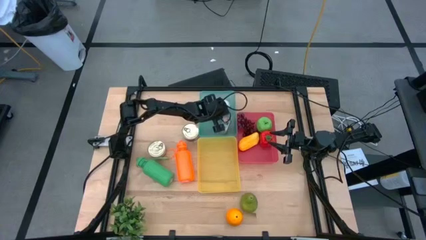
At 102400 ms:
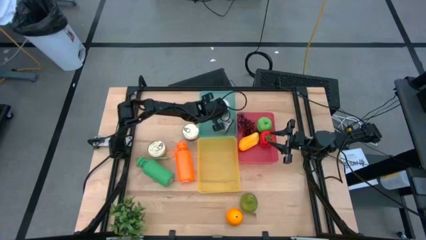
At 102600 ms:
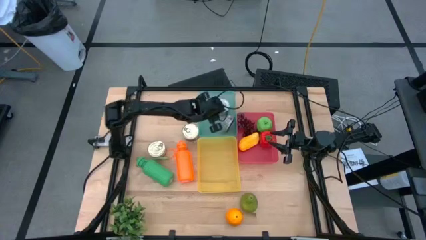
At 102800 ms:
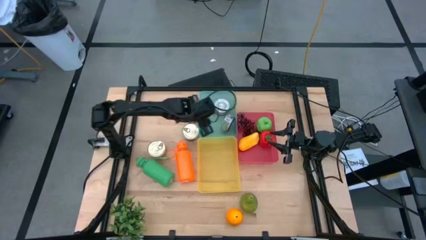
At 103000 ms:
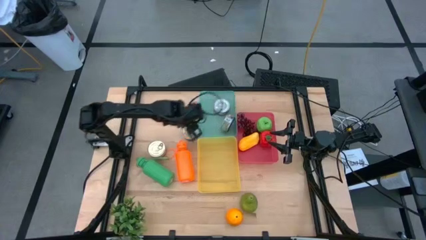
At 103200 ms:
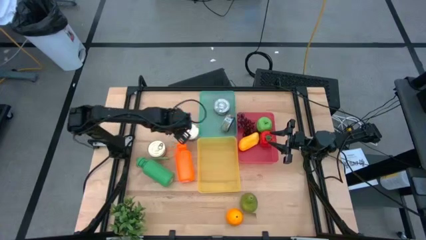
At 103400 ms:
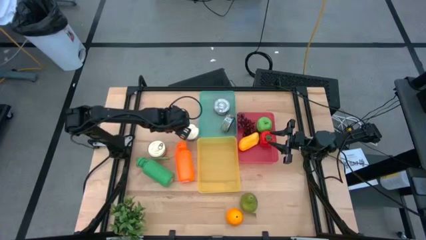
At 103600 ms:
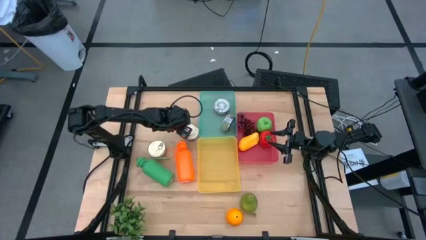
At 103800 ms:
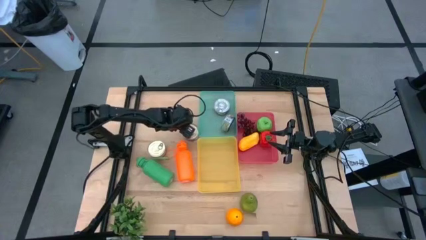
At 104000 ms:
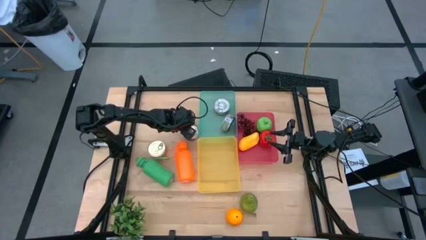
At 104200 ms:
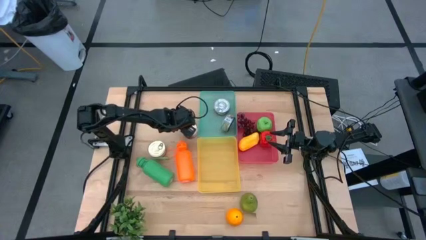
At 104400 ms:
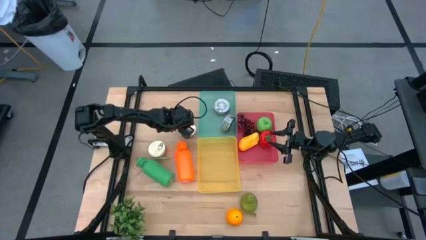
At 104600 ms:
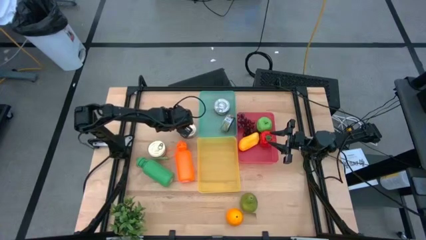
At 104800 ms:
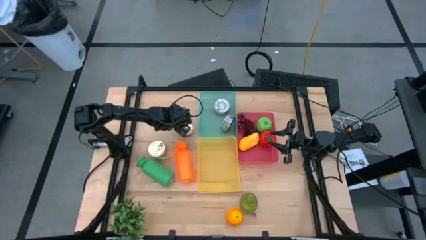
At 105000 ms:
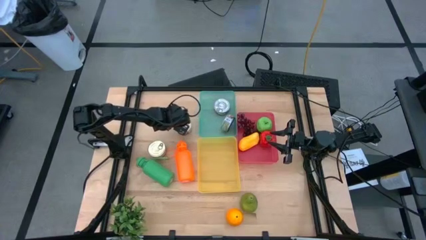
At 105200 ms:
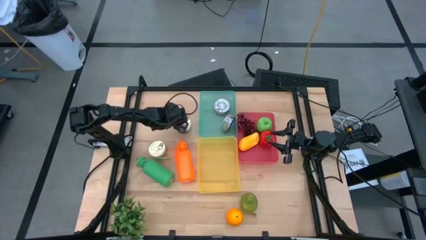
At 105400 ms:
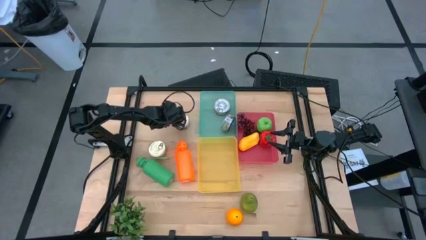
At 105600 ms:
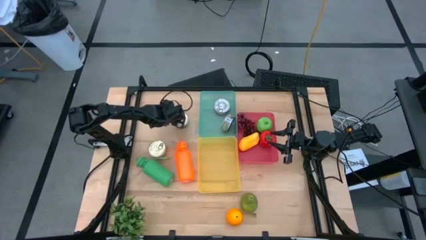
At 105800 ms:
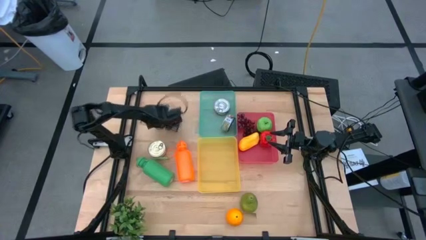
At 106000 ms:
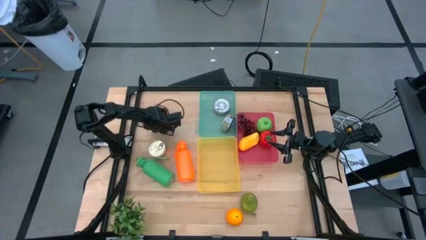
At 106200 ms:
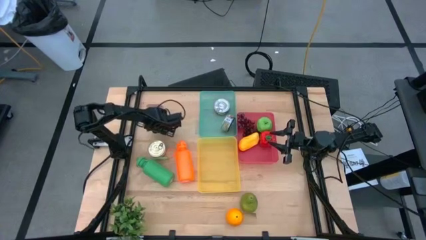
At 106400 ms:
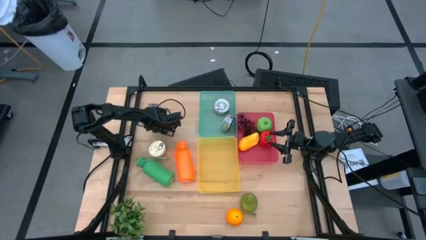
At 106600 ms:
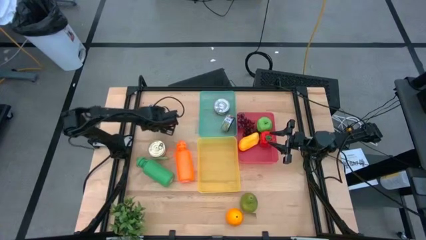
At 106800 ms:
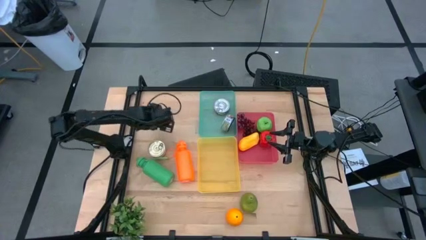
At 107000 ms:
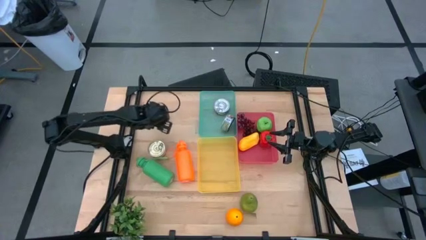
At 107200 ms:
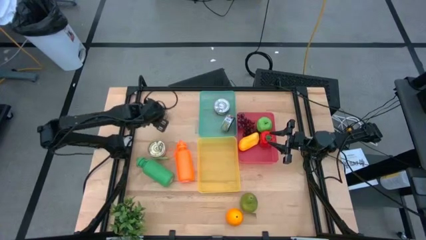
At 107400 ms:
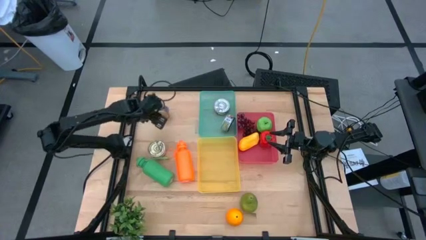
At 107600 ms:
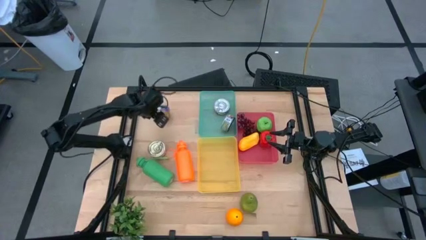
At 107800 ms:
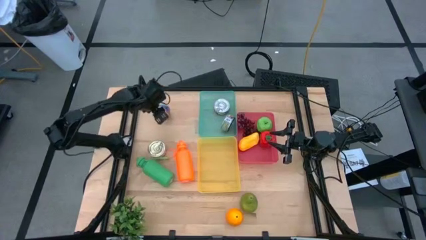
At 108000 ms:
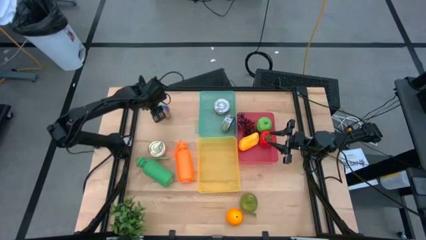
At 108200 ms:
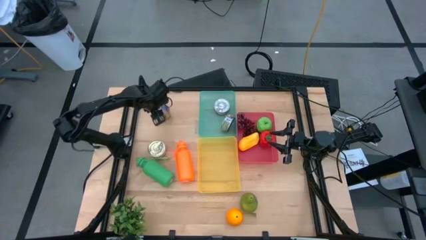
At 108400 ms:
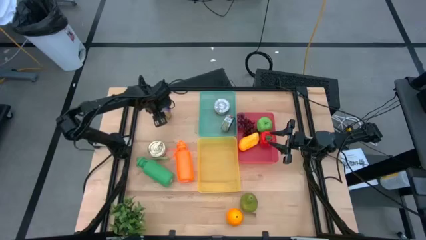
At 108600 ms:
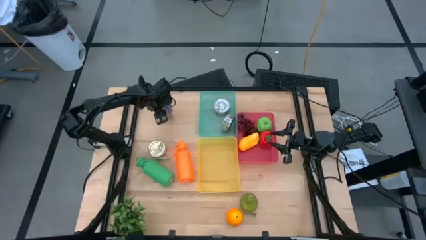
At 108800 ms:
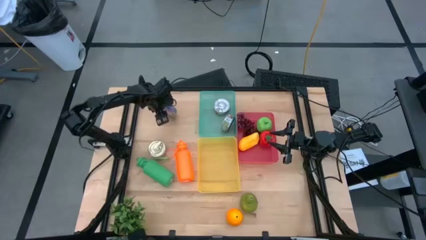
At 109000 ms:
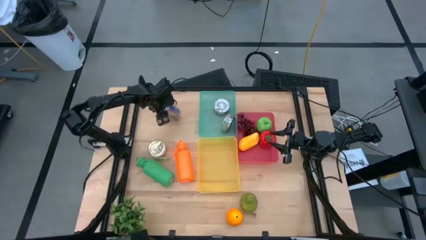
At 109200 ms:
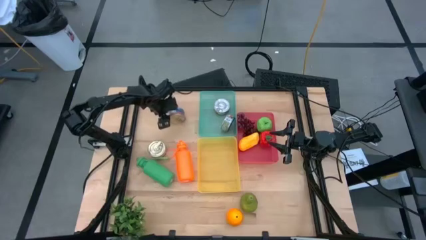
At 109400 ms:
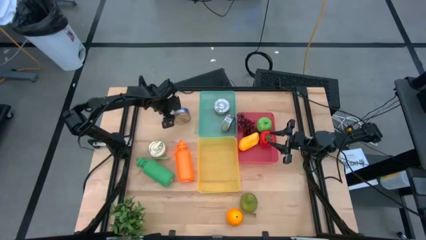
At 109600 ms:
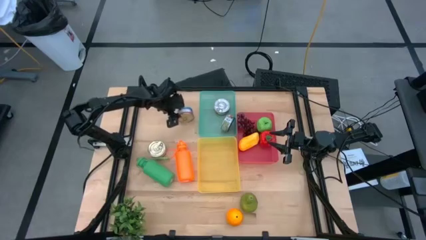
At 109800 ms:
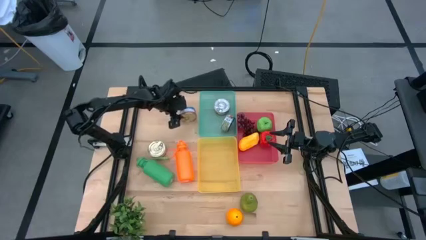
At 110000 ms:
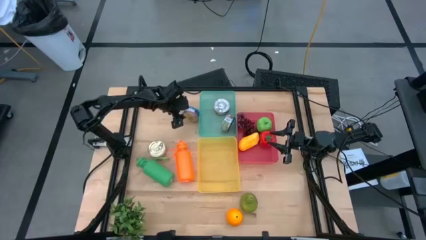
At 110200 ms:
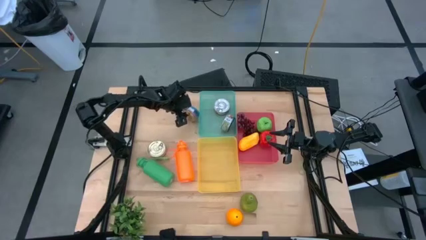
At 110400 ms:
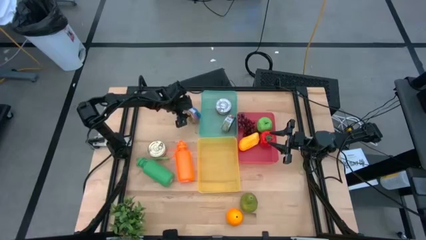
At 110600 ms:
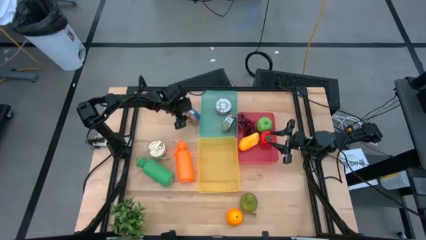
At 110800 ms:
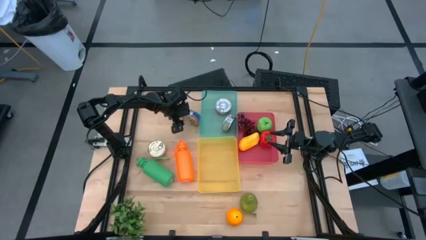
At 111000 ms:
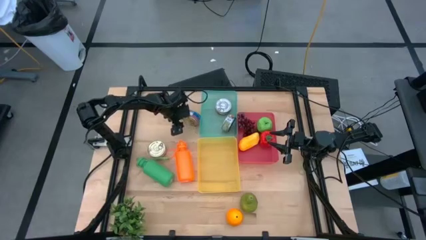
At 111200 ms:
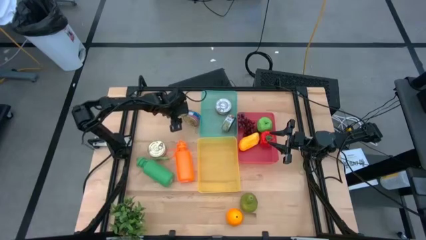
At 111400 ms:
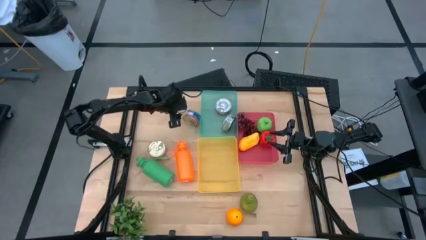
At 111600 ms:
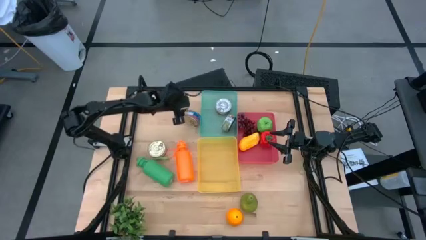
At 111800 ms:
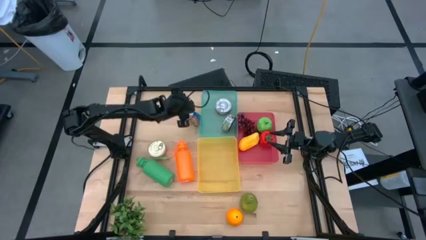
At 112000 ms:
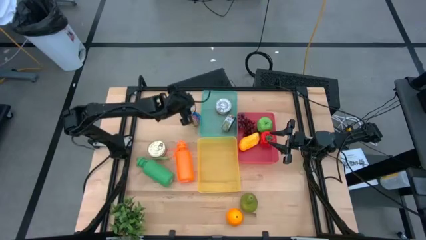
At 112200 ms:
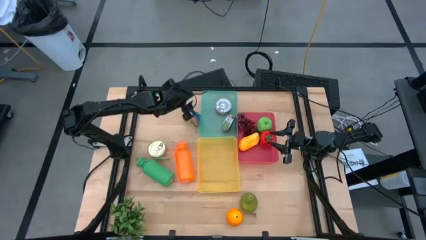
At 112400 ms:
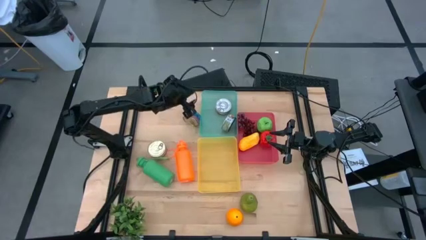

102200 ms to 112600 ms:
Task: Pick & Place Food Item
Put the top blue pink tuna can into the light blue bin
